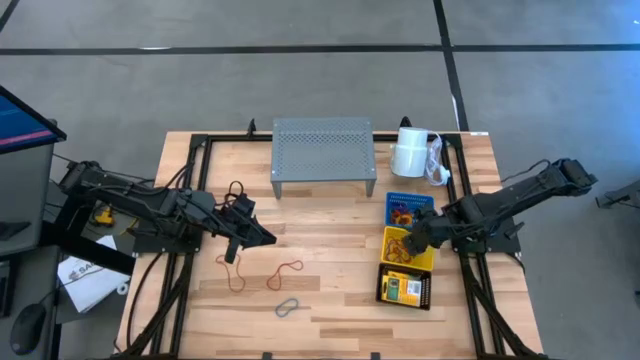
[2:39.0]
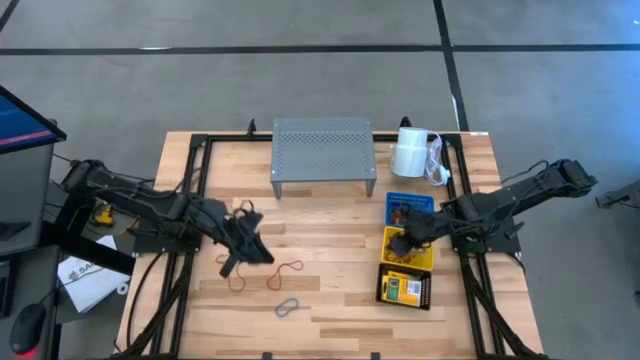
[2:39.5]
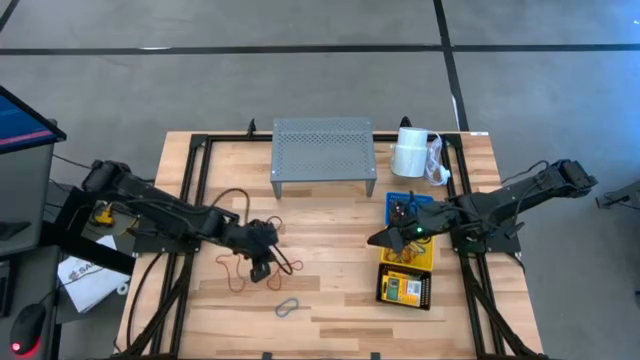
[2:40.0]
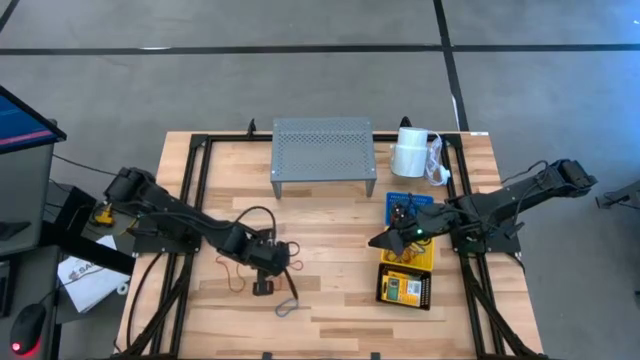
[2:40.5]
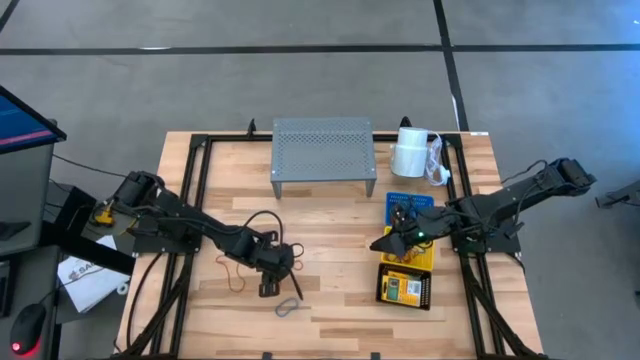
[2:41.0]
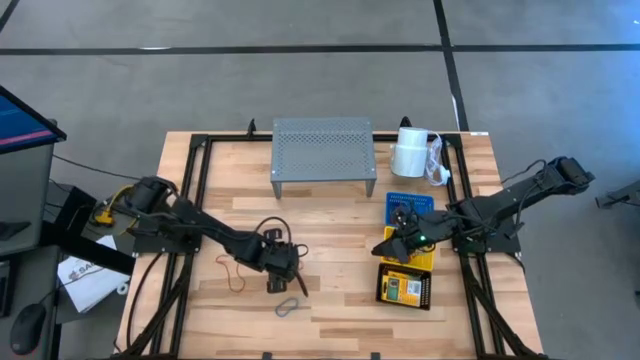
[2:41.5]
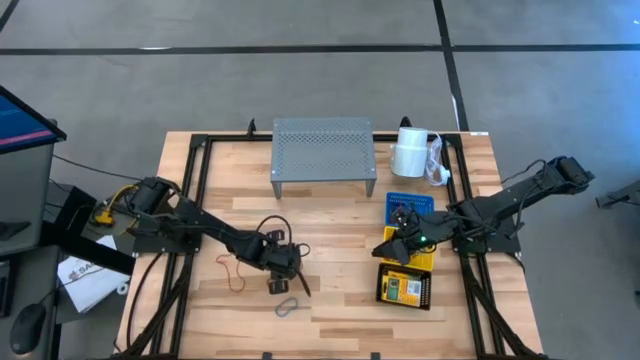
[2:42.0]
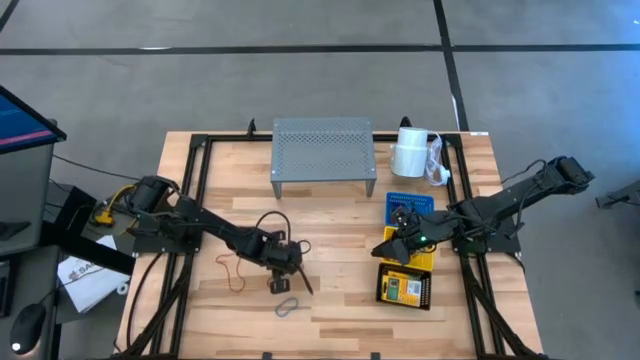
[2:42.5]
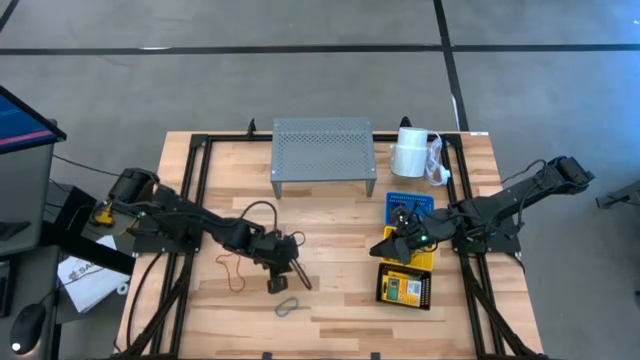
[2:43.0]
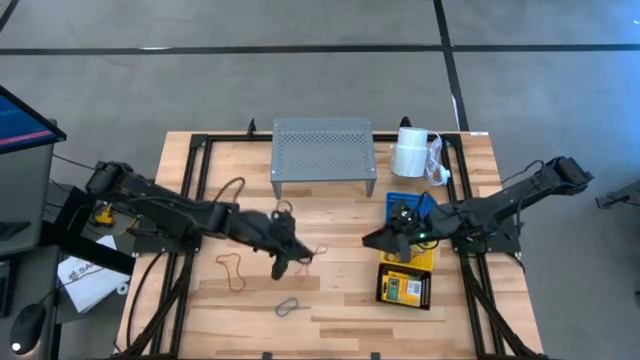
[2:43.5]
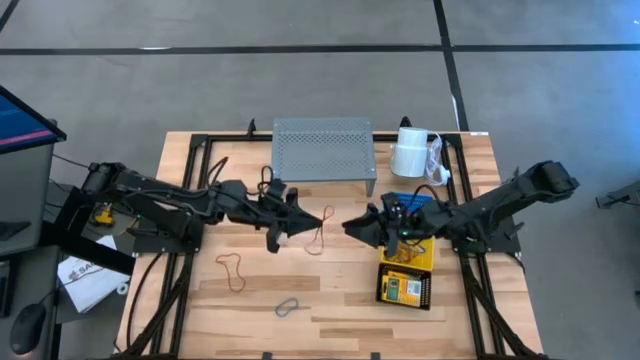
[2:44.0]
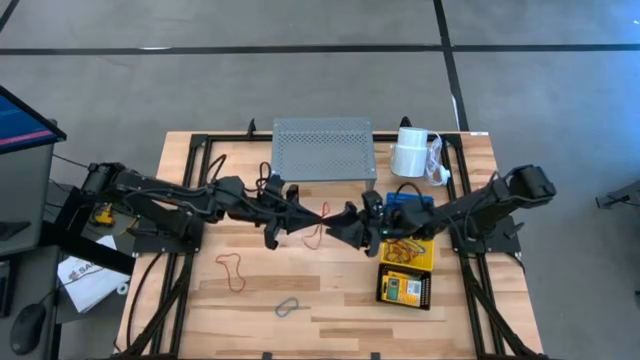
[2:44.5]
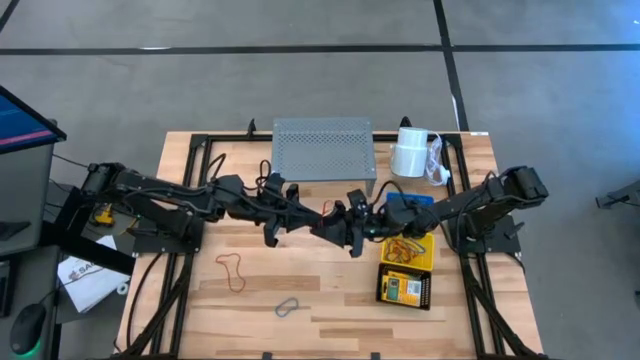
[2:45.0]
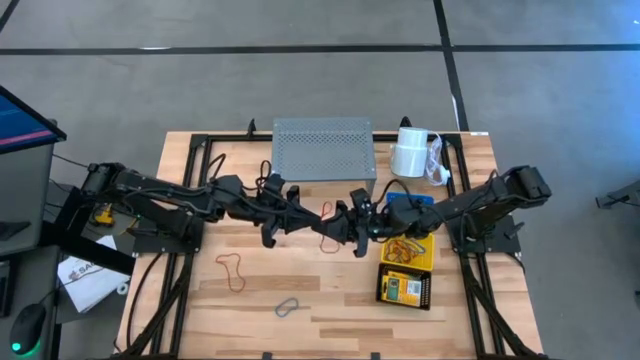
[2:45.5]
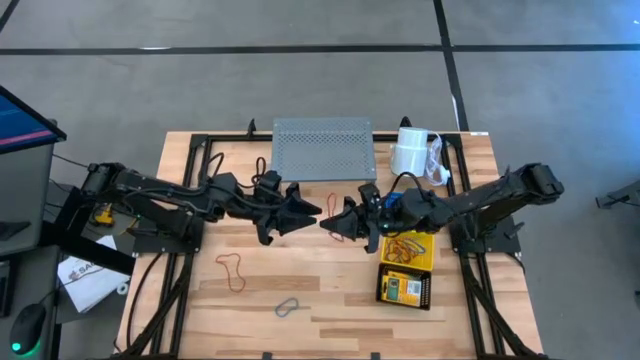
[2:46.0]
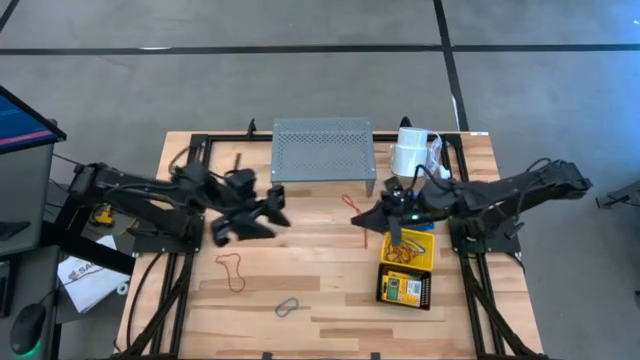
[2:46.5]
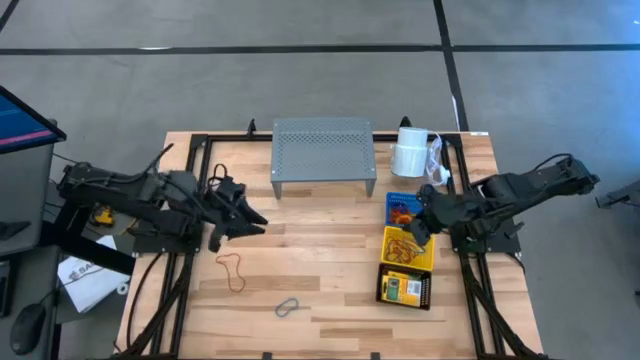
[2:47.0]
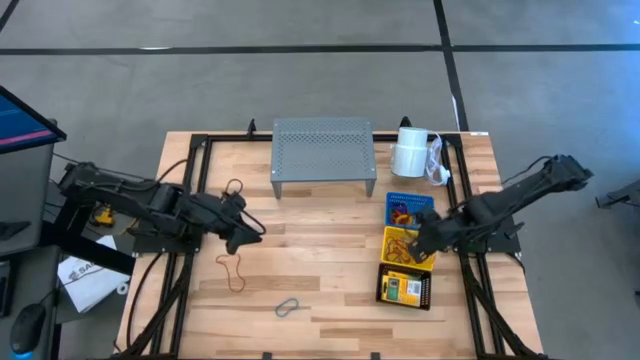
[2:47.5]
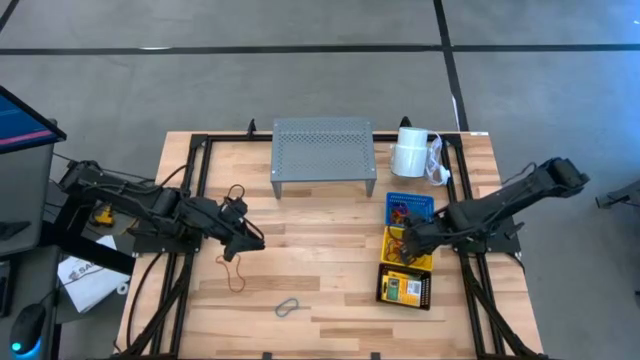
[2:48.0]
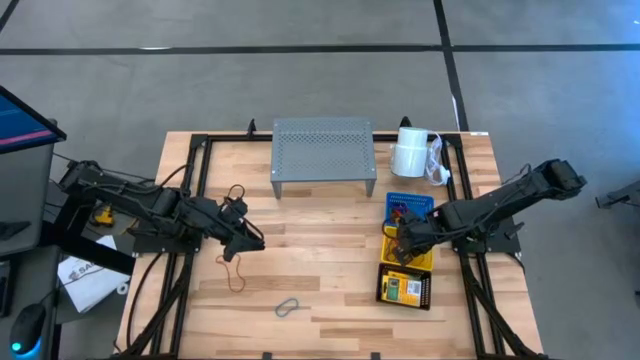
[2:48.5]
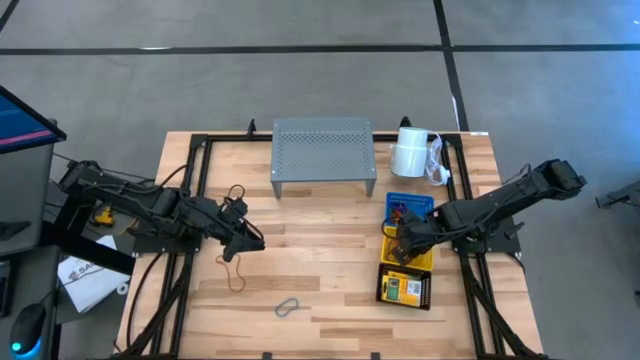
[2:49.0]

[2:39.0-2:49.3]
Task: Pick & Place Office Desk Supplies
Put the red rubber band into the yellow basket

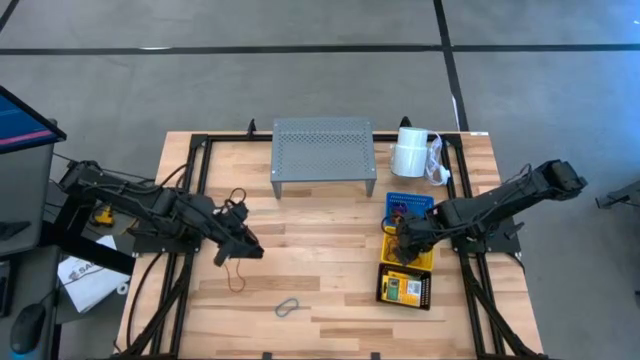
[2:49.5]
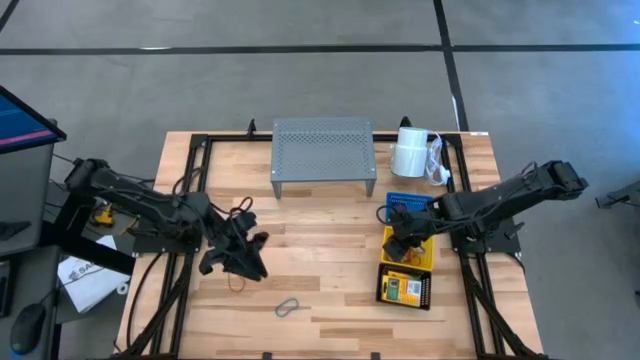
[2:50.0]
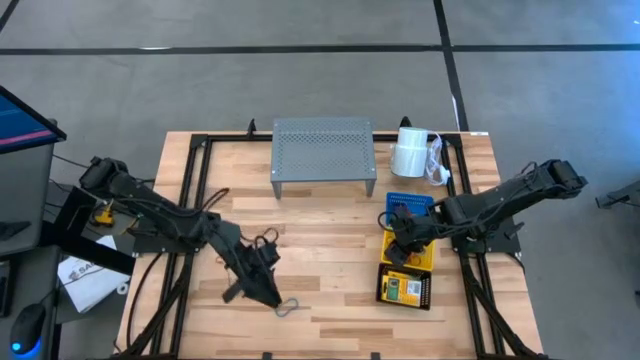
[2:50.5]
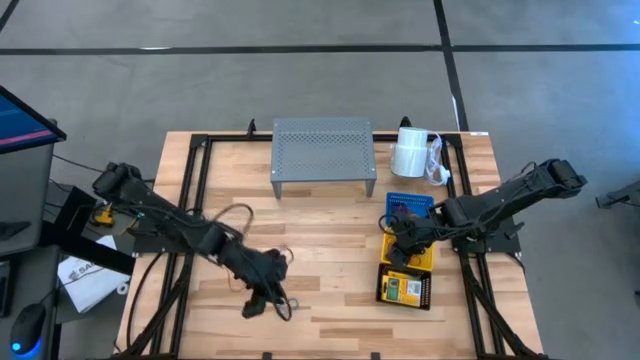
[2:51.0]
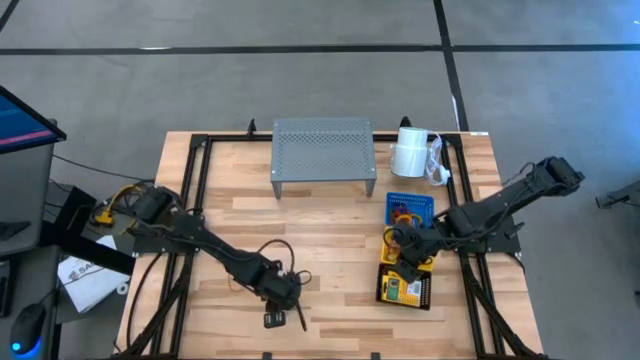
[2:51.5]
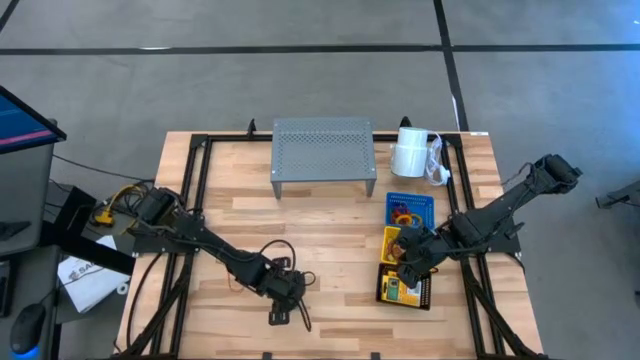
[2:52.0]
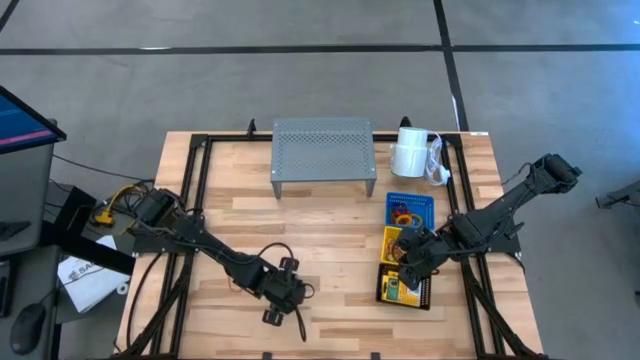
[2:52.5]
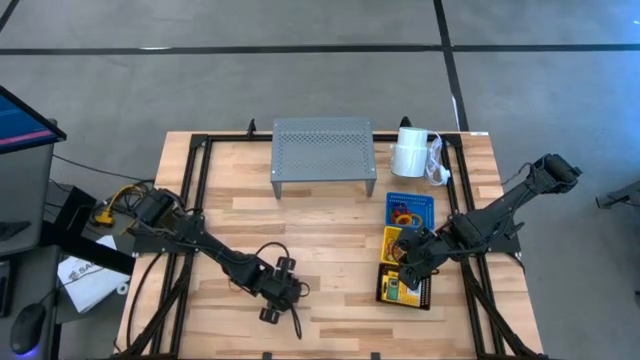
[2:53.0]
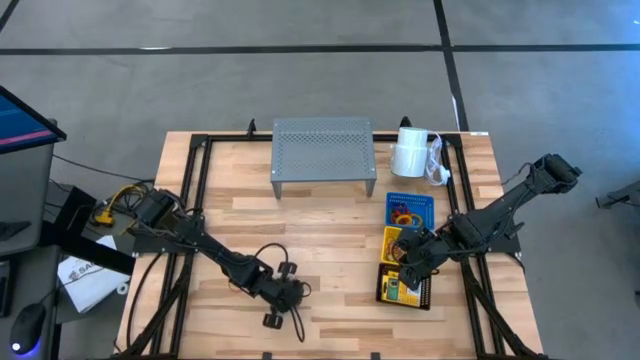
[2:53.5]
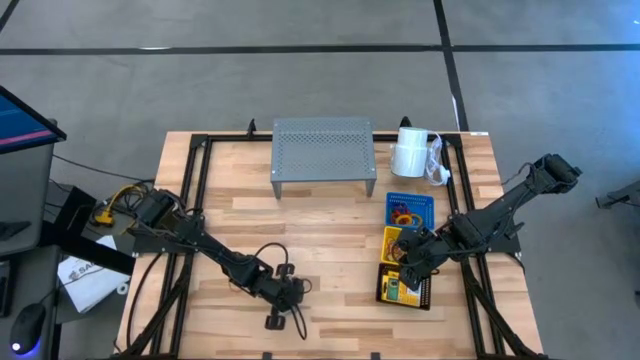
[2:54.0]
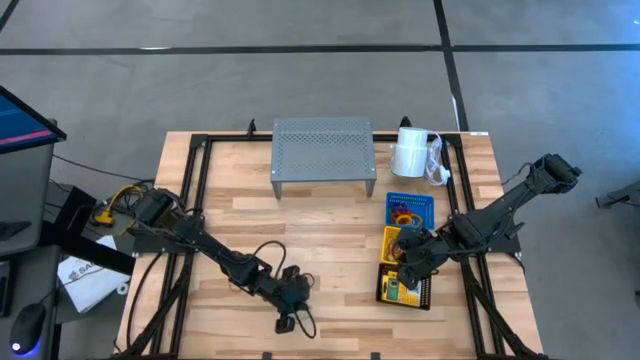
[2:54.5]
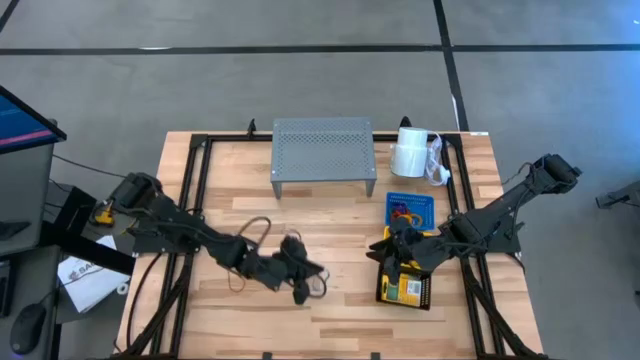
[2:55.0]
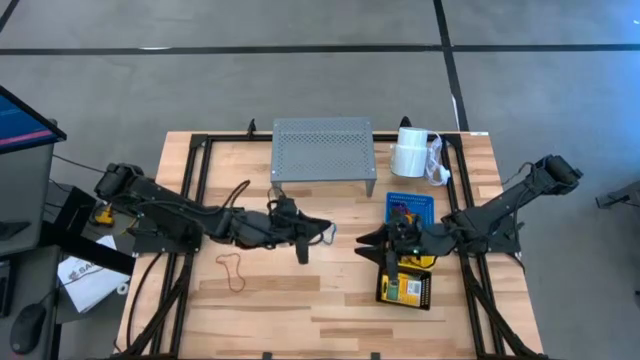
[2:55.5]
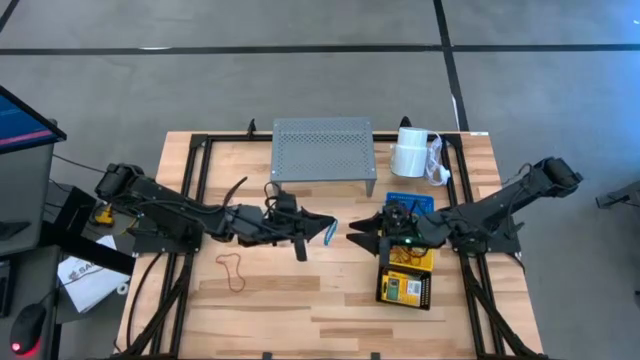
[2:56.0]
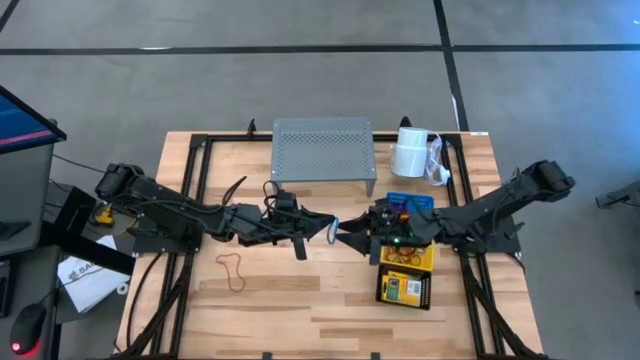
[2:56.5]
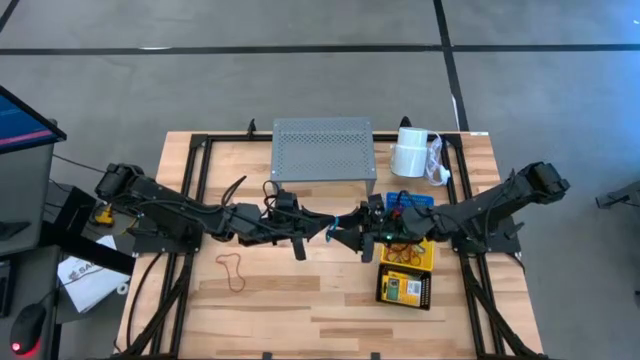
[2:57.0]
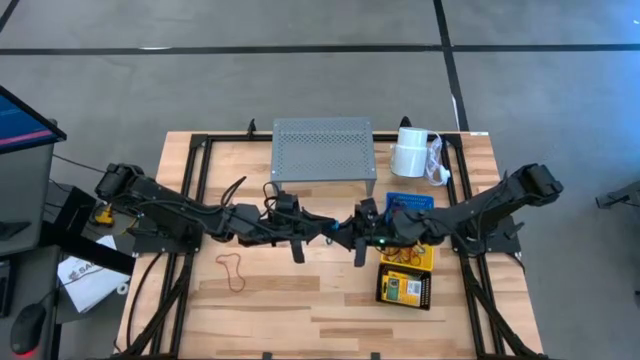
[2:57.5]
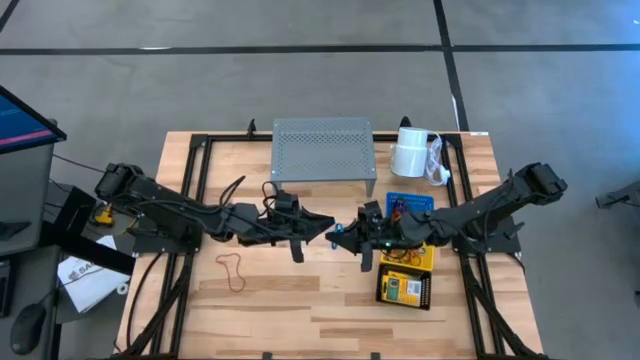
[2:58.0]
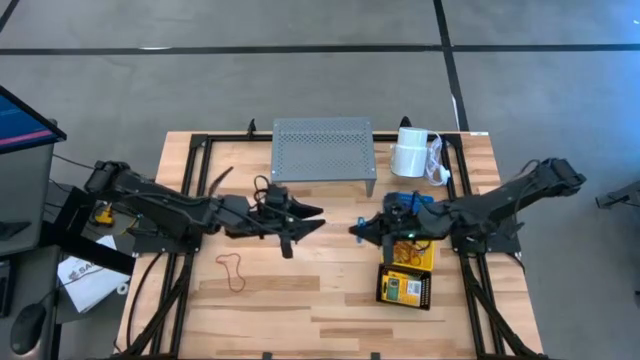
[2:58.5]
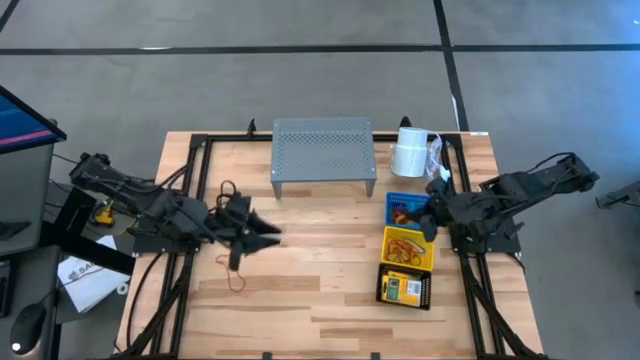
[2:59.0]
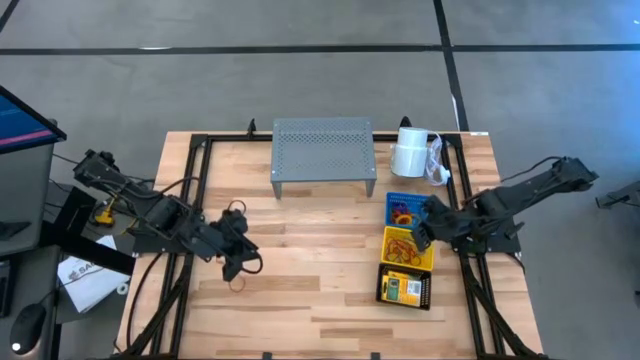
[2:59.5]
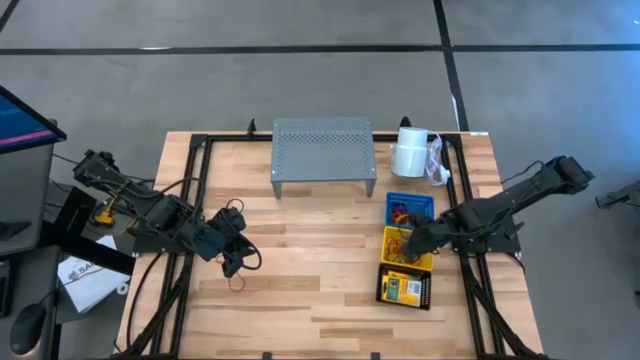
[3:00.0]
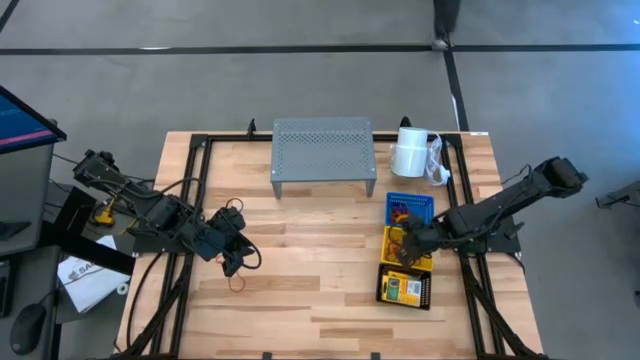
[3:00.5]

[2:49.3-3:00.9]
Put the blue rubber band into the yellow basket
